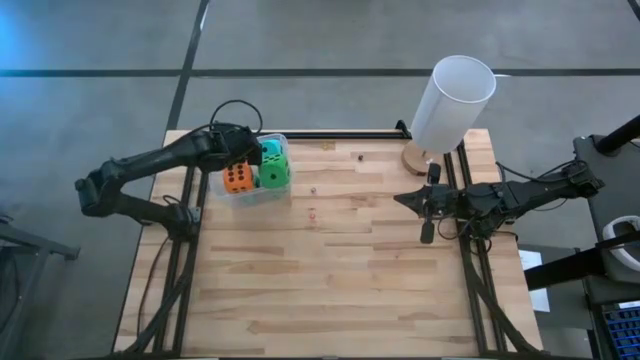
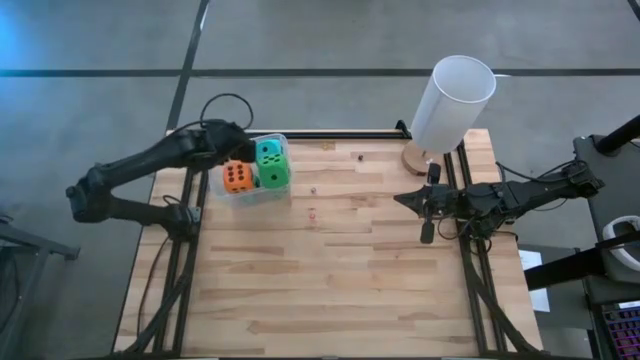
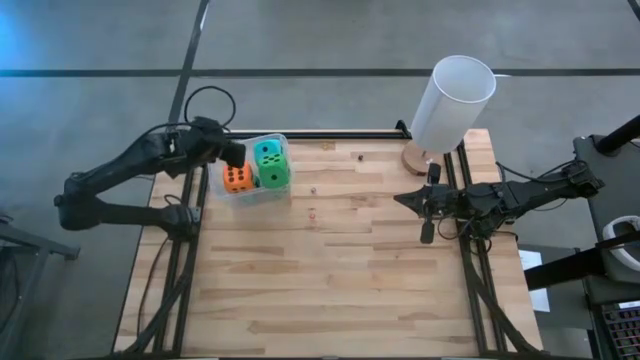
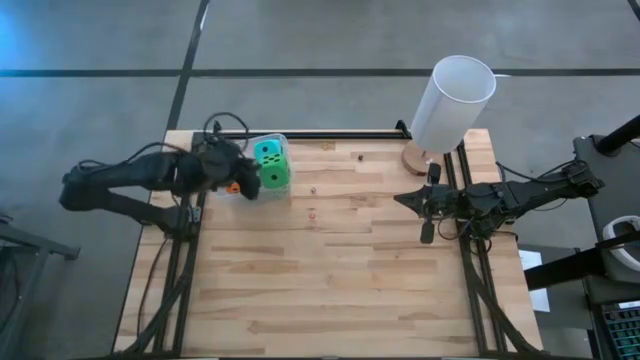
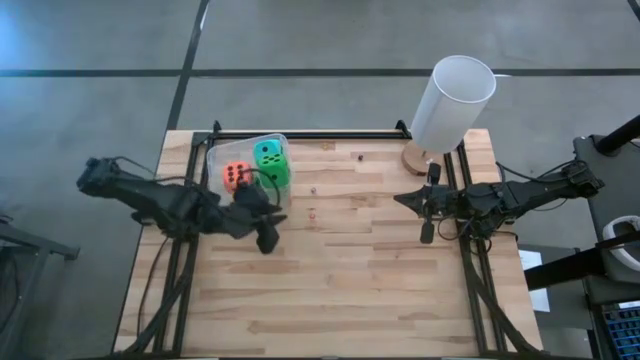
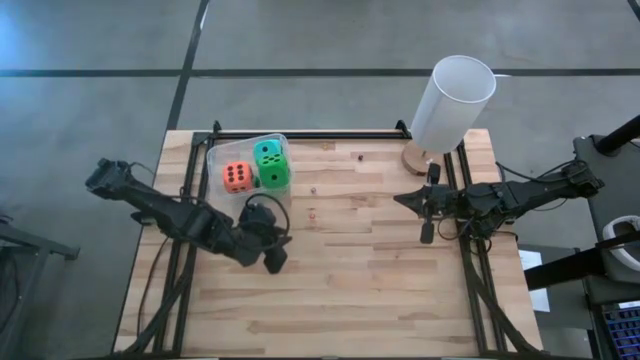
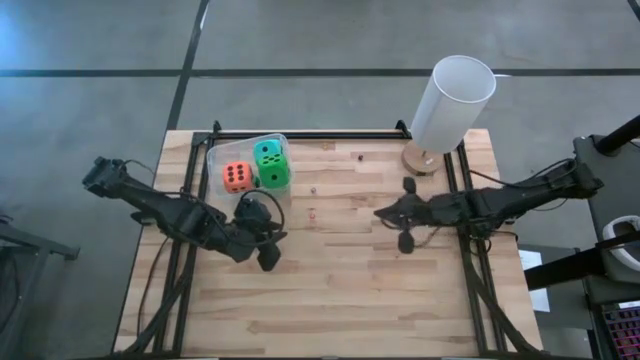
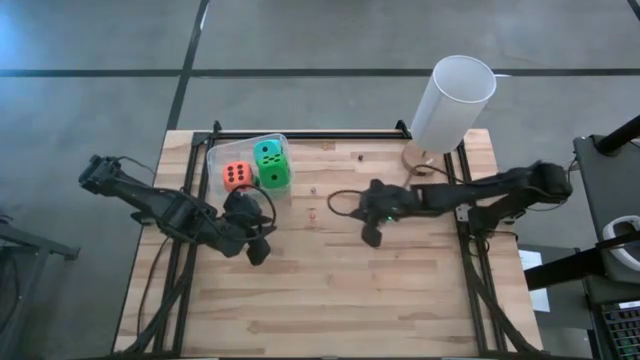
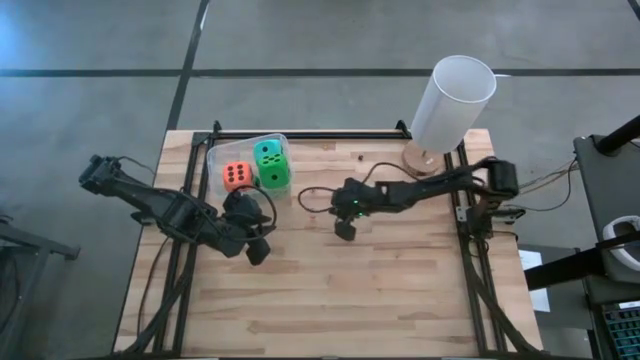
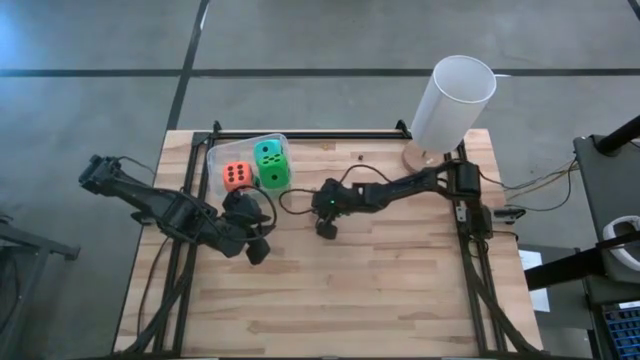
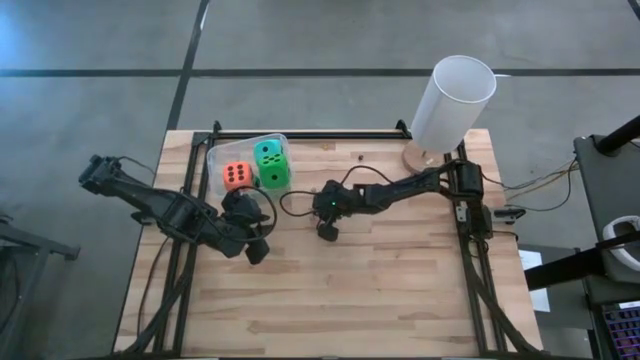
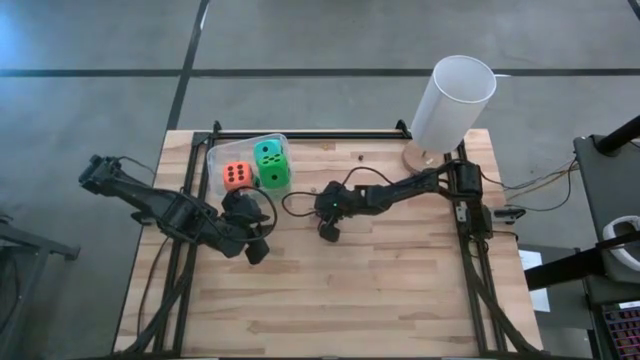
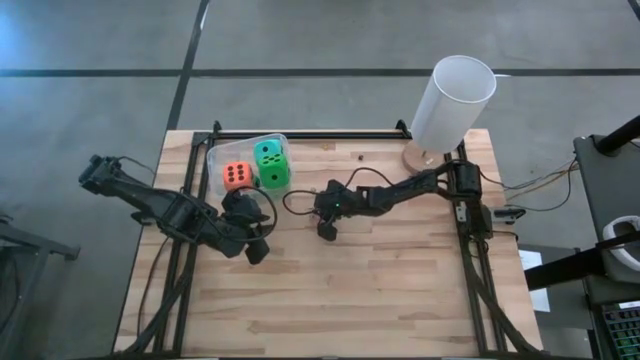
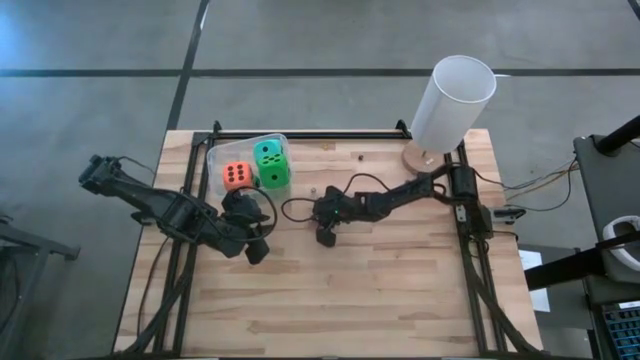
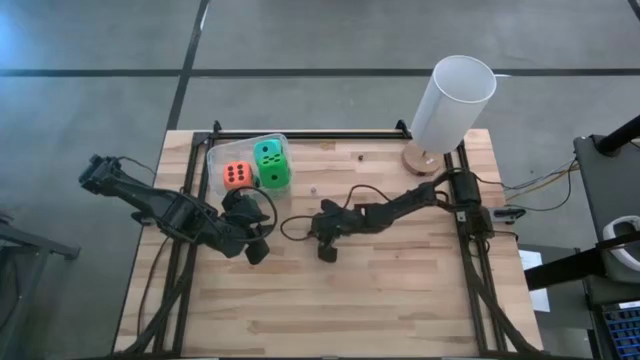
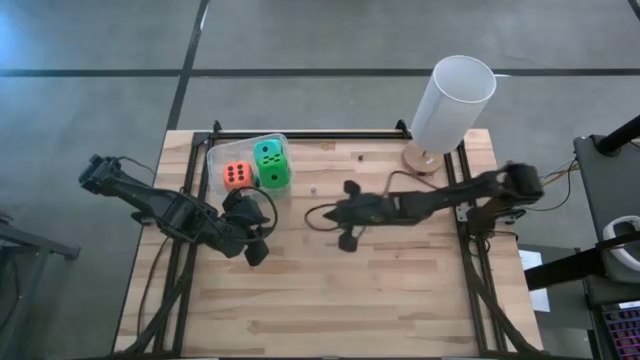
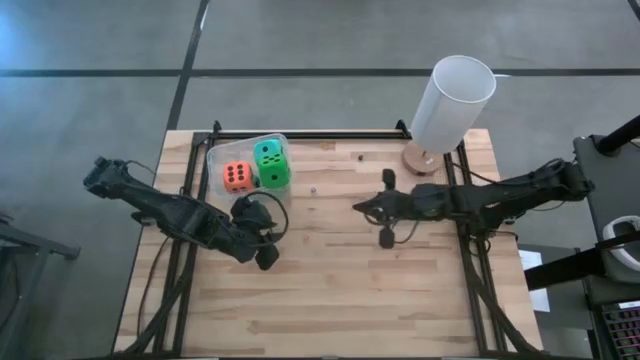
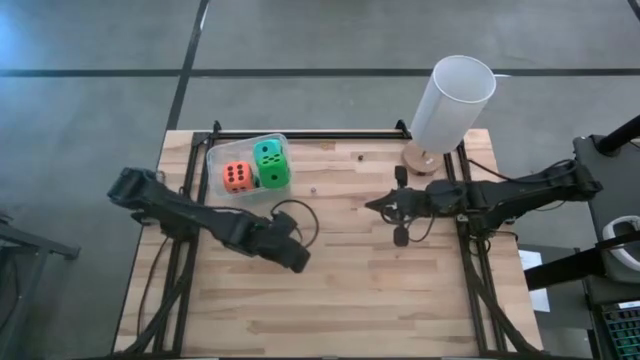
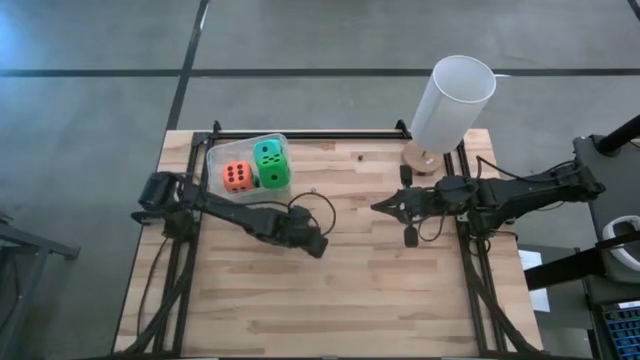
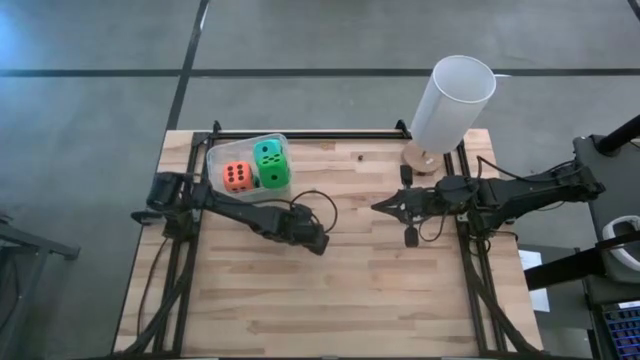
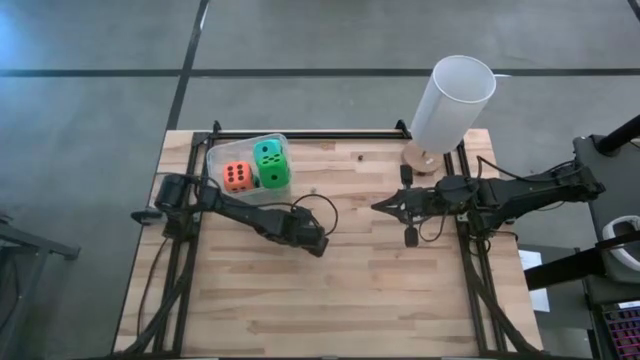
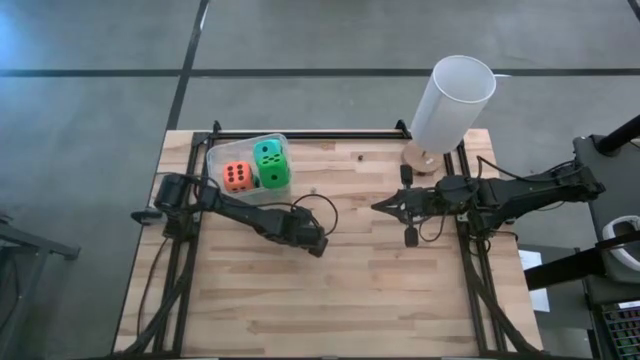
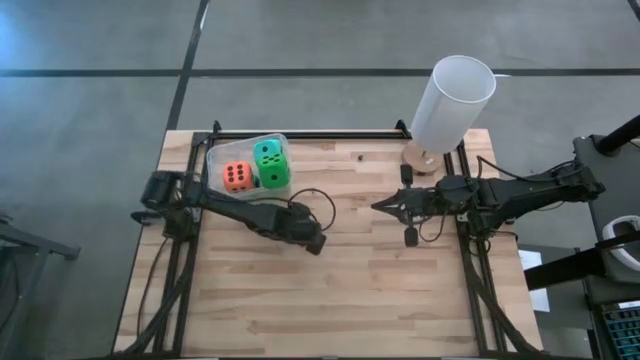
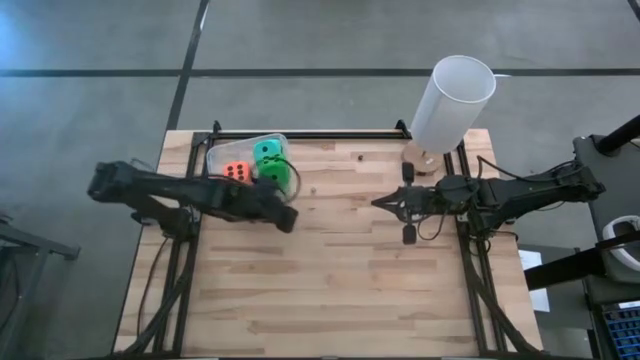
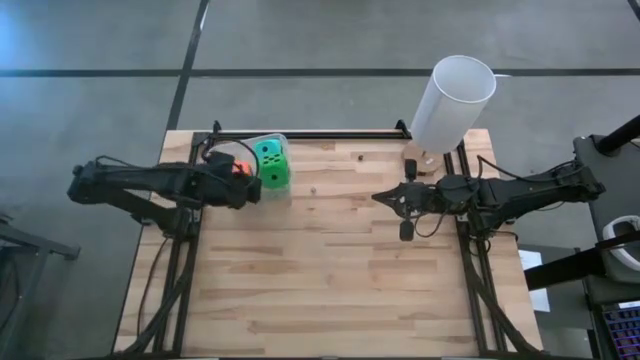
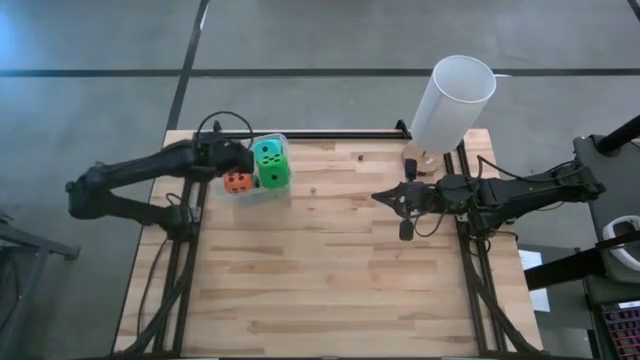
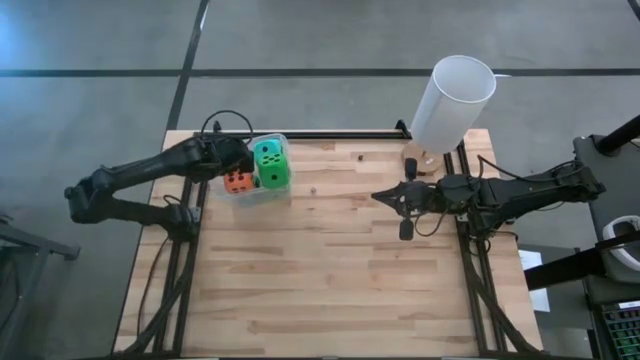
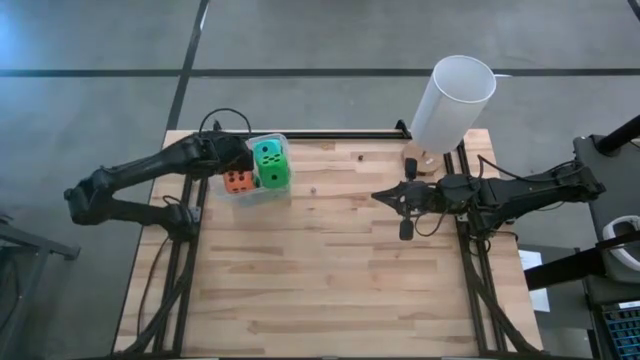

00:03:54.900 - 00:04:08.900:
Task: Pick & Place Dice
Put the small pink dice into the transparent bin

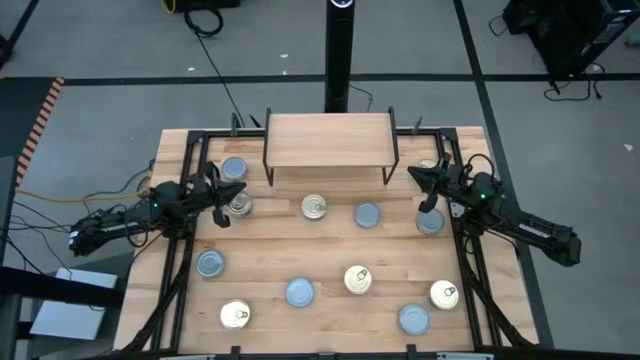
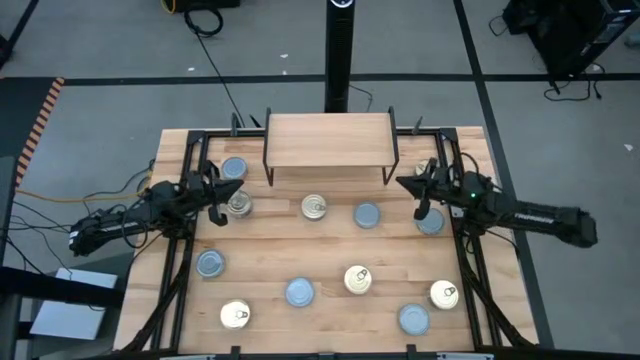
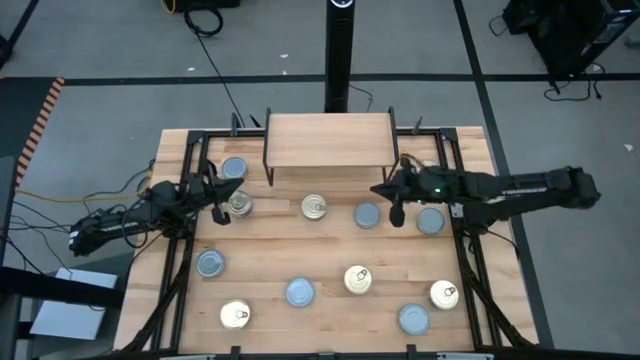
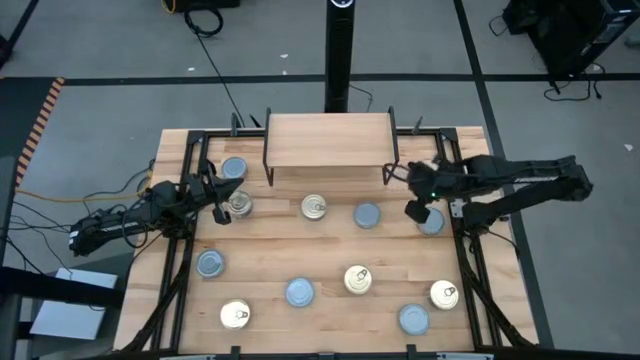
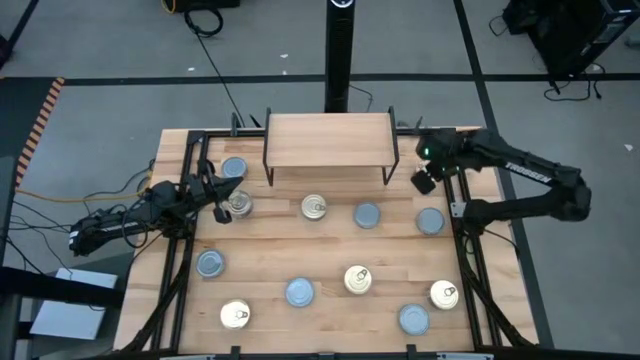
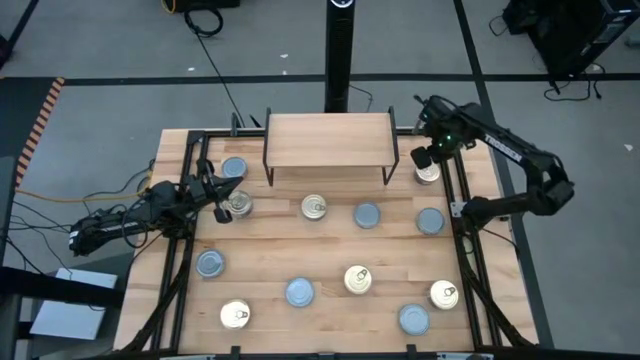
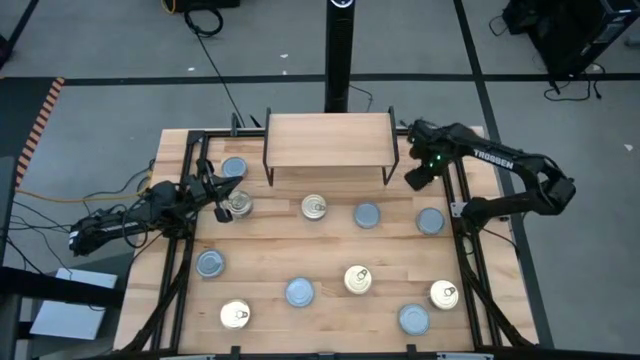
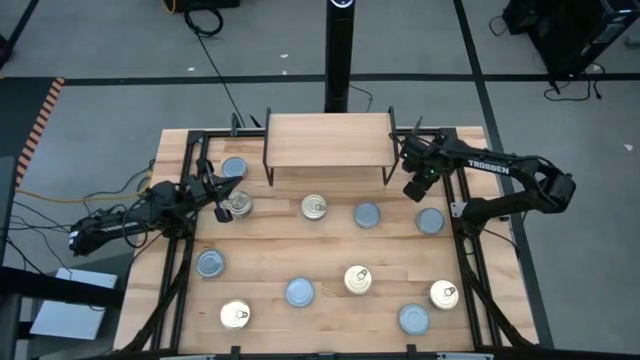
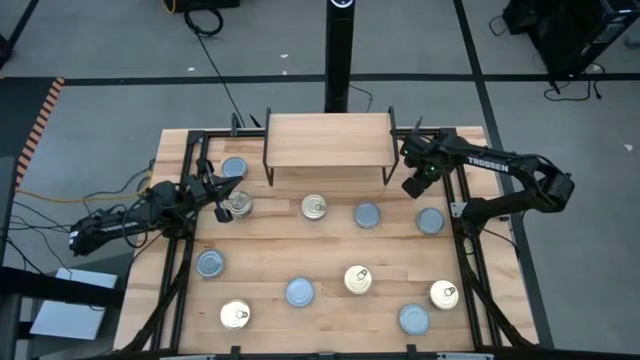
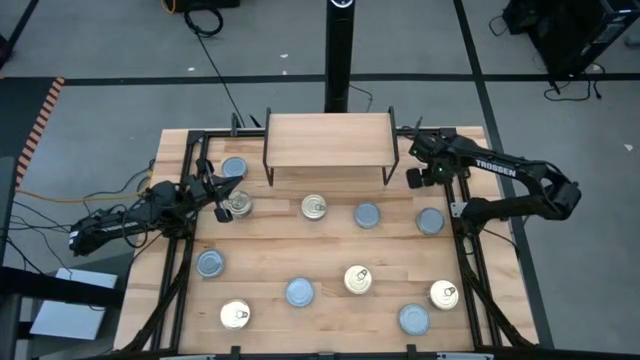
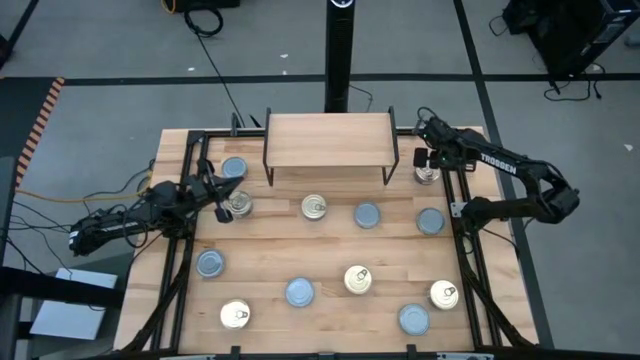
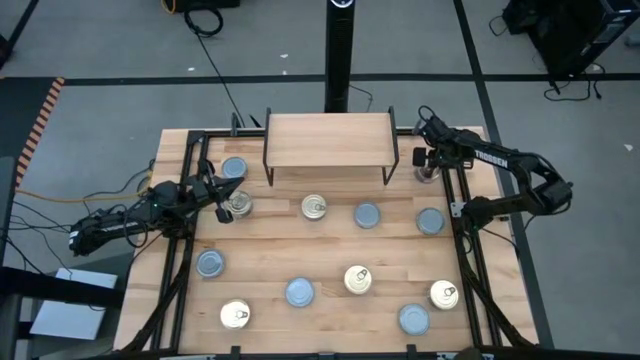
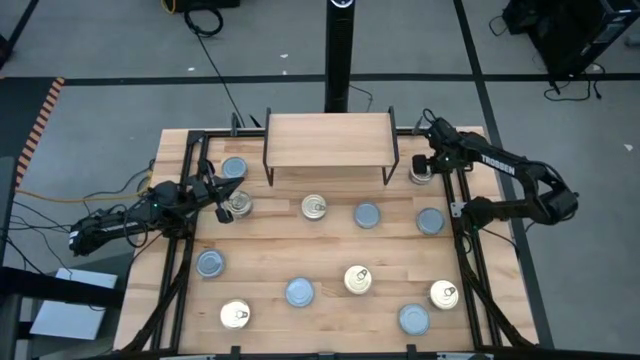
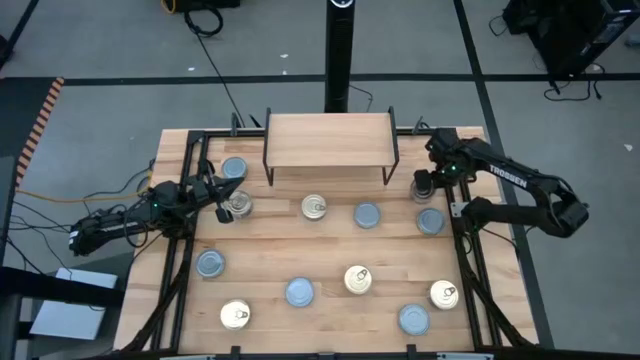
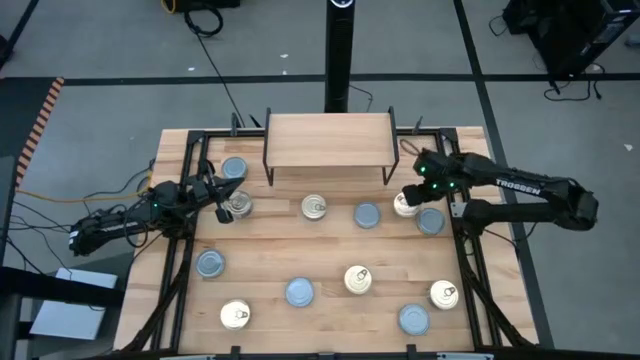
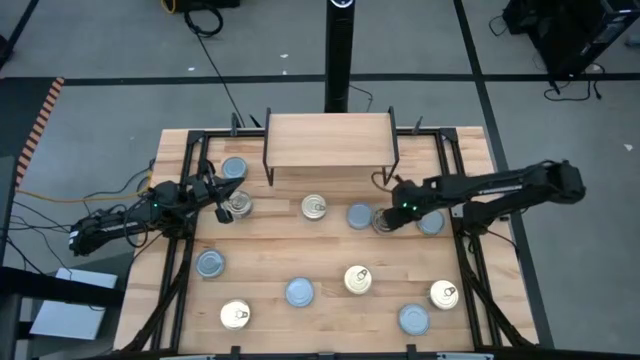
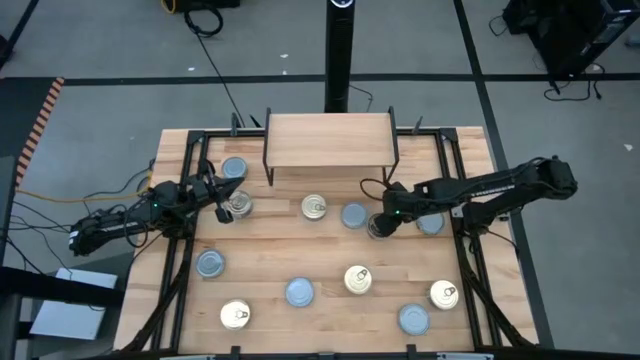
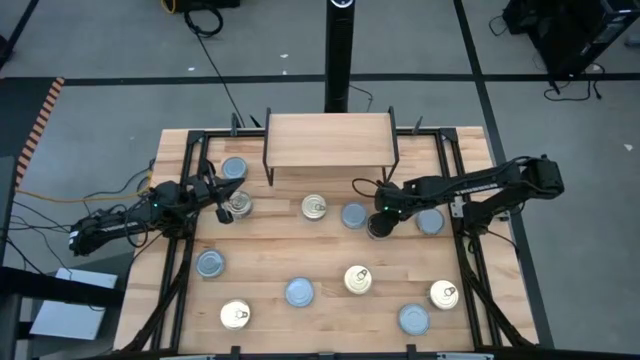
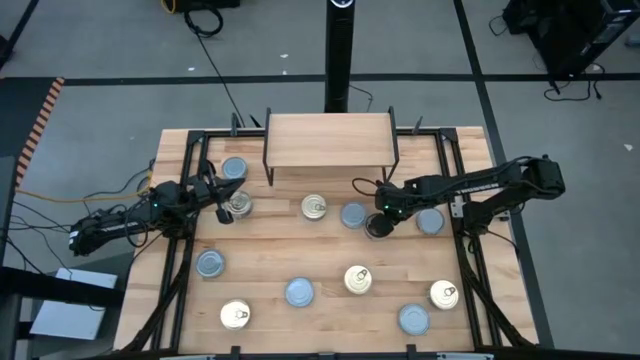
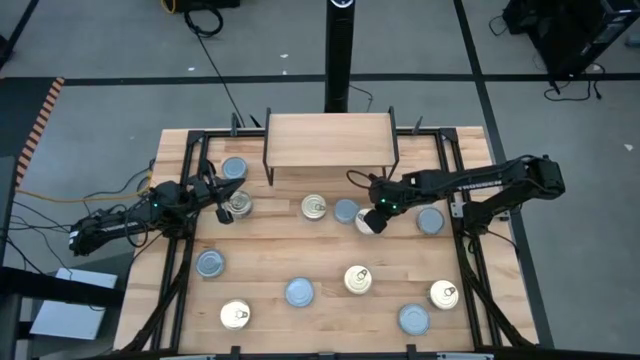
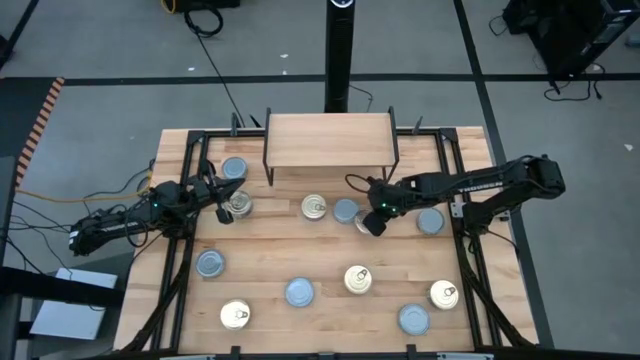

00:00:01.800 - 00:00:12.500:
Task: Stack canned seafood by type on shelf
Put the blue pink tuna can on the shelf
